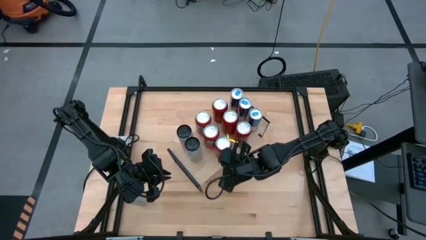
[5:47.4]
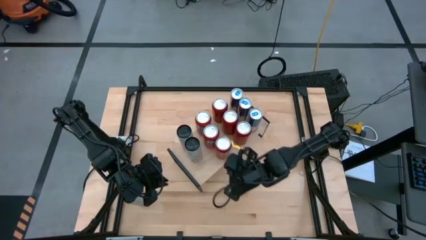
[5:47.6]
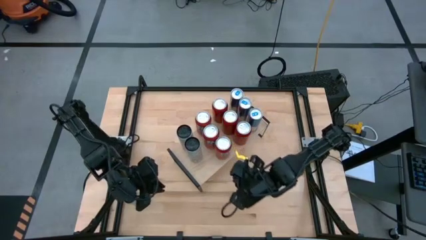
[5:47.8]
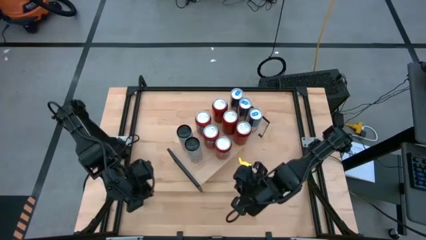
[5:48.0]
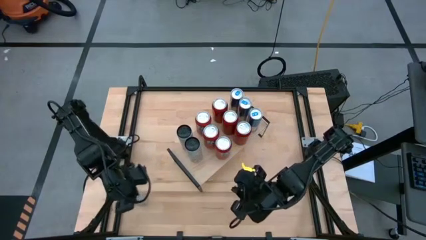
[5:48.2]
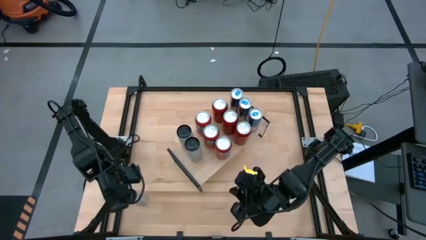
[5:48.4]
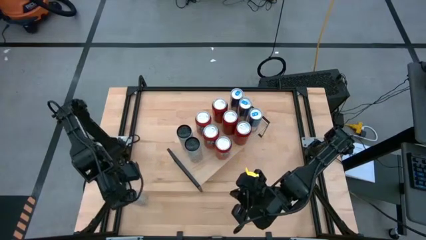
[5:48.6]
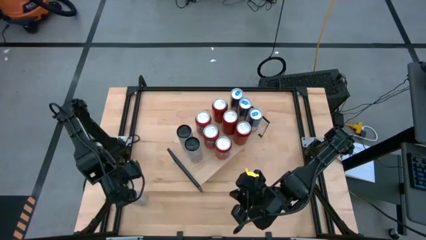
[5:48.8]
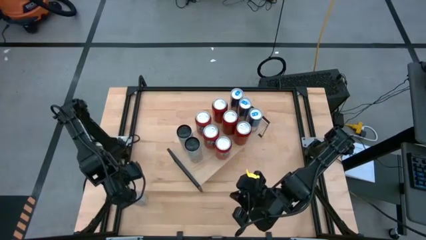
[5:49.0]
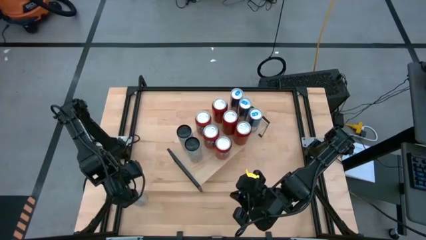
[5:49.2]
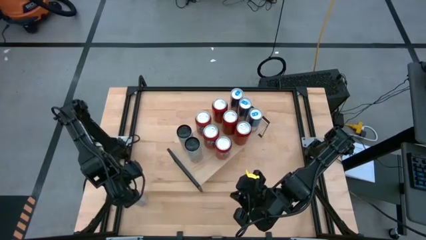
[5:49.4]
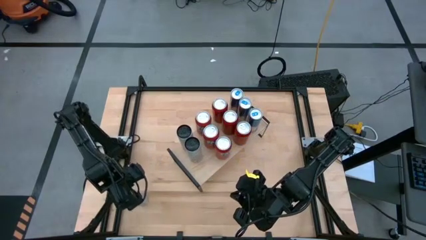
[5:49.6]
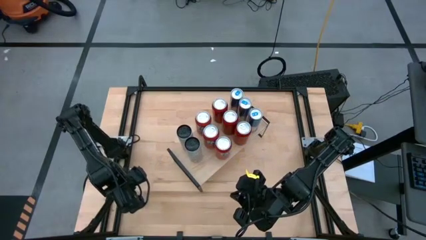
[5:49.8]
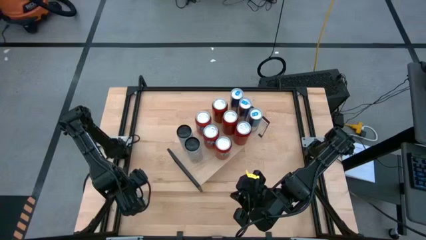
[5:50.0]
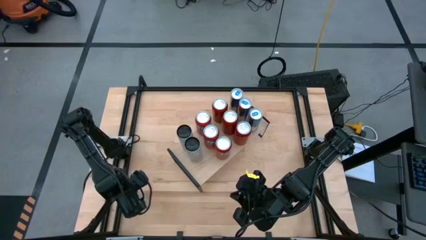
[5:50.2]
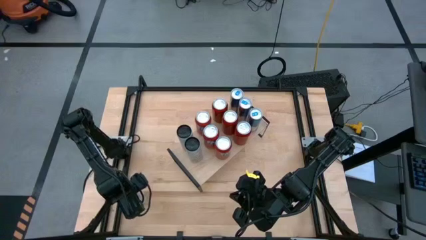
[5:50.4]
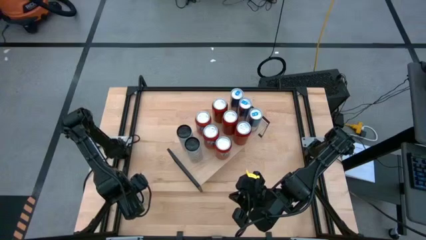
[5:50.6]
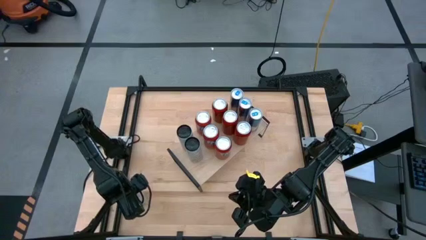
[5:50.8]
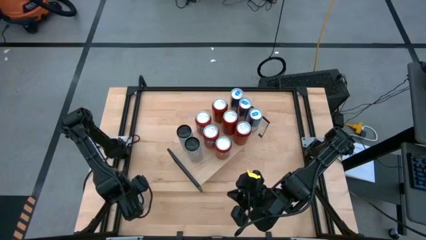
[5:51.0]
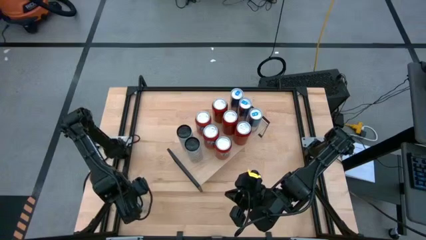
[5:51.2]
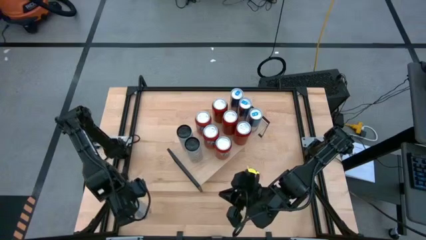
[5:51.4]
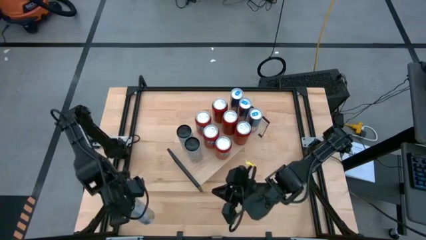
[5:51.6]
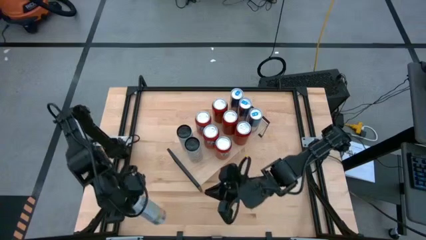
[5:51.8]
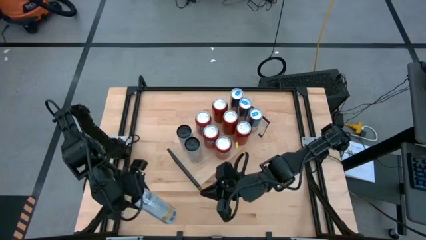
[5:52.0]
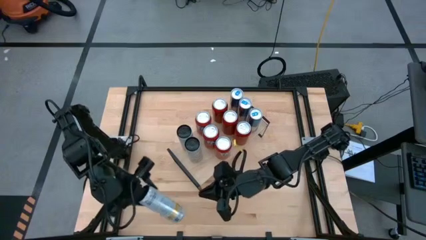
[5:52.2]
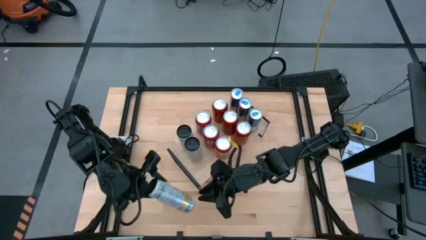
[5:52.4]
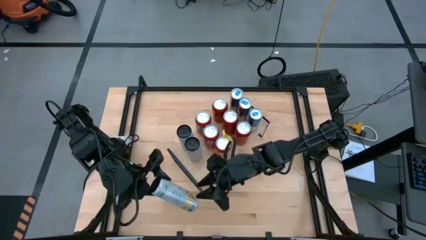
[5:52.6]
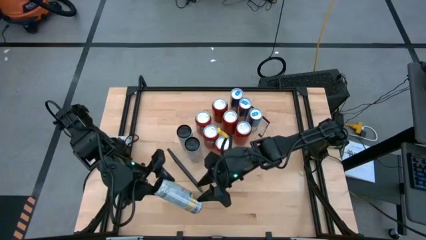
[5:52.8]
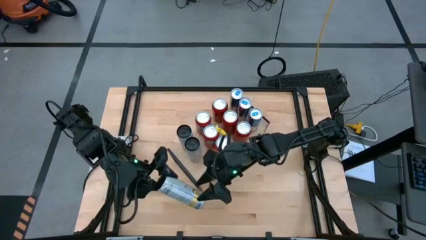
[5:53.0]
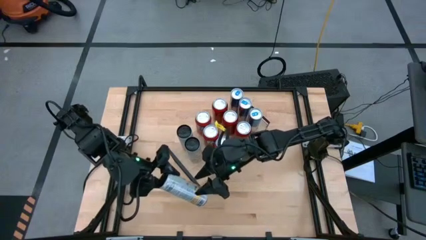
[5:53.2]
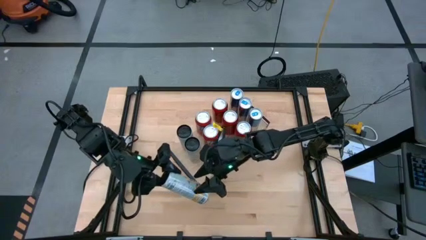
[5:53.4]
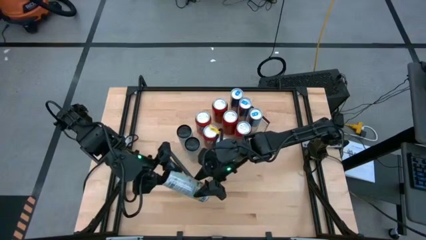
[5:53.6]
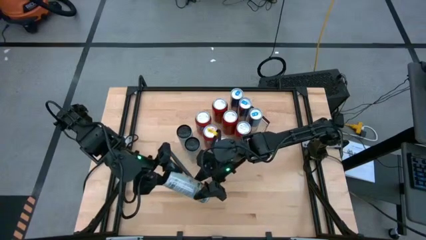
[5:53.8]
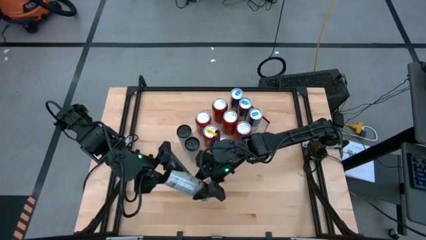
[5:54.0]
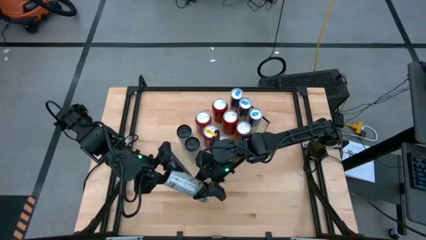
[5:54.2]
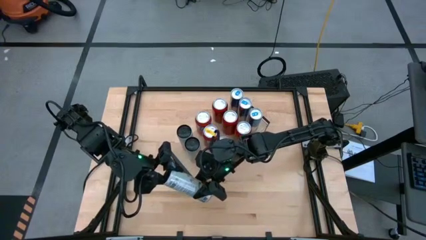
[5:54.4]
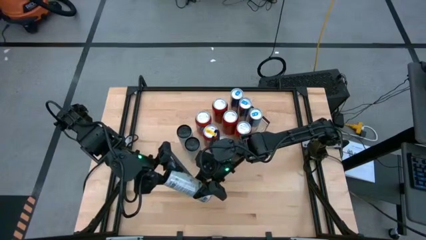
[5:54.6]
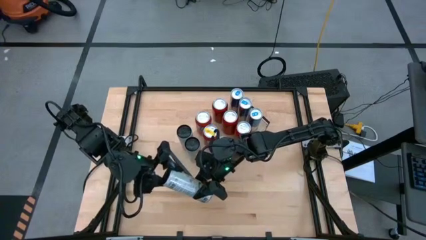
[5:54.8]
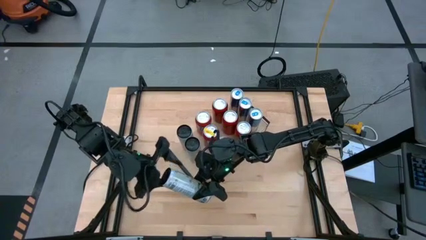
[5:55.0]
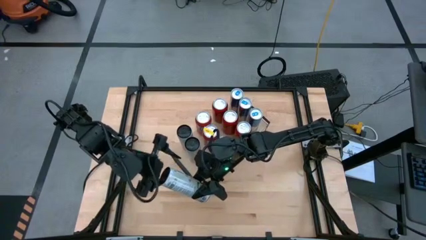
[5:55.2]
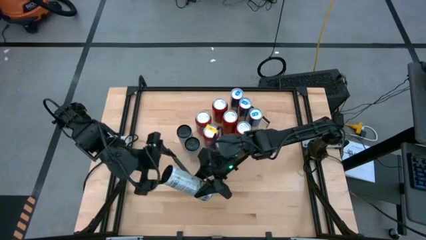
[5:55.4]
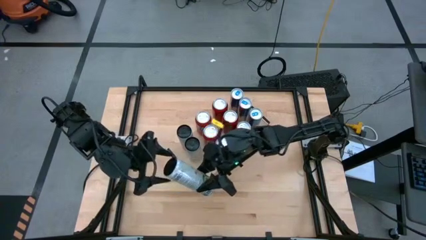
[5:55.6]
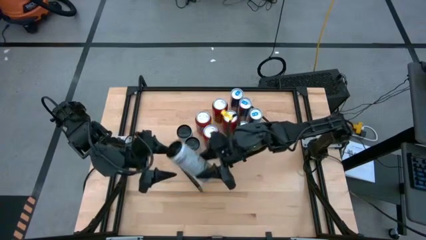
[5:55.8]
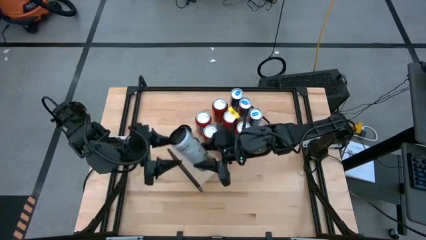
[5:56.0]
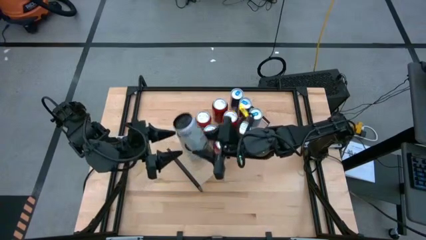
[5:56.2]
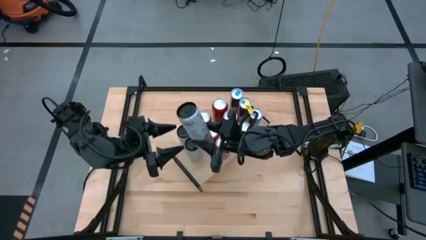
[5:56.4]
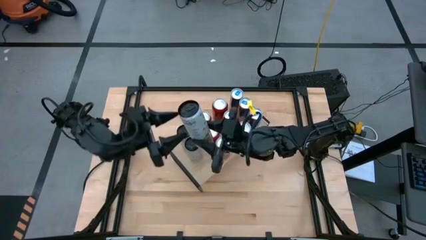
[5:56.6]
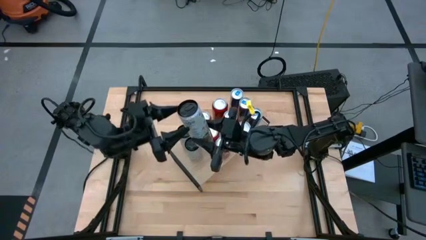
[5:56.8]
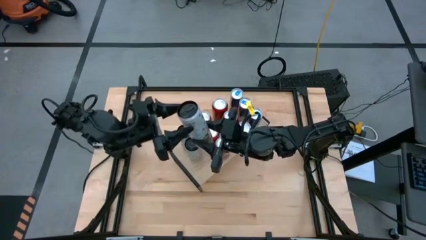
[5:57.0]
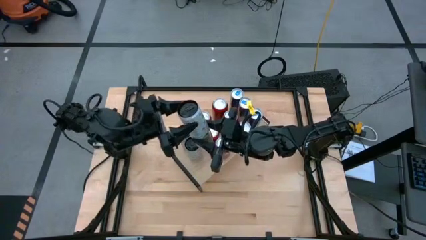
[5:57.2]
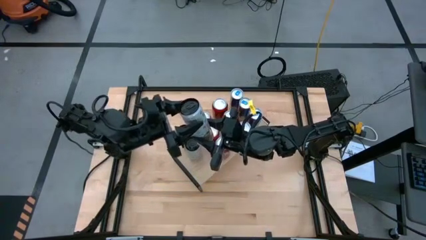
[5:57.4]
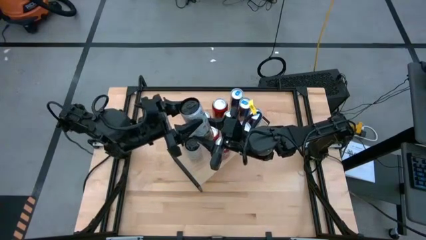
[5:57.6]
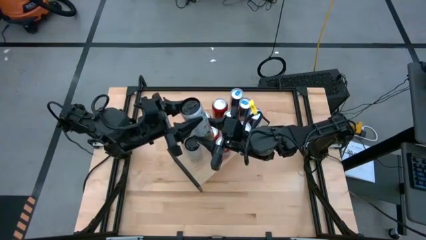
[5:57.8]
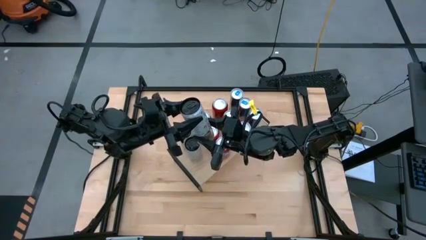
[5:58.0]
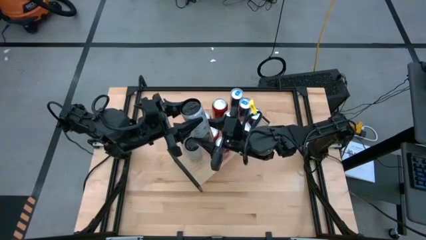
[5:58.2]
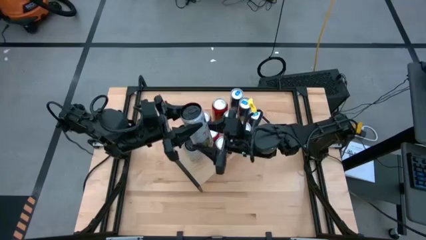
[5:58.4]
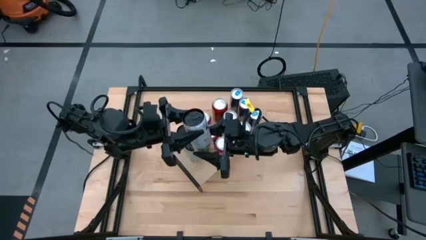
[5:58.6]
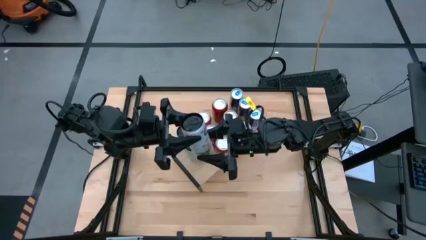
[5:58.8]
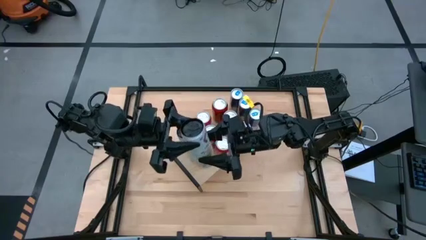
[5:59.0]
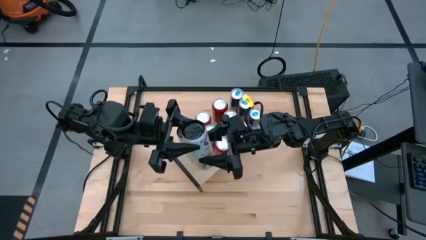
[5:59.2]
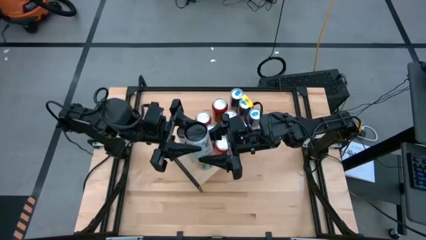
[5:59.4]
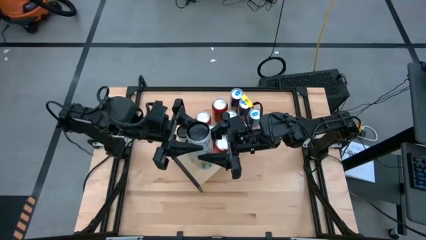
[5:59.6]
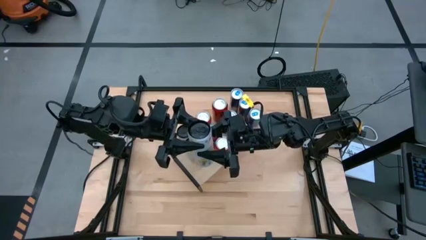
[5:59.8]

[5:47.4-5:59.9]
Task: Place canned beverage on shelf
Put the white soda can on the shelf

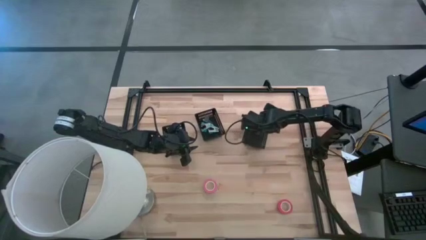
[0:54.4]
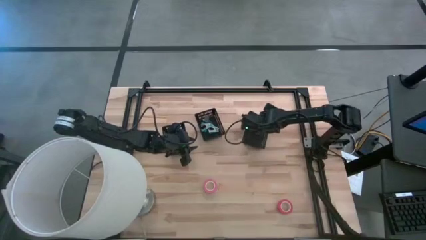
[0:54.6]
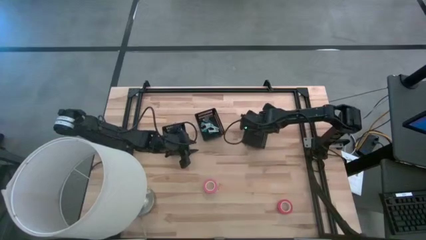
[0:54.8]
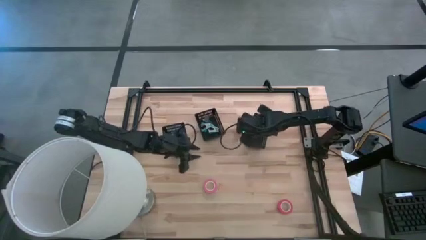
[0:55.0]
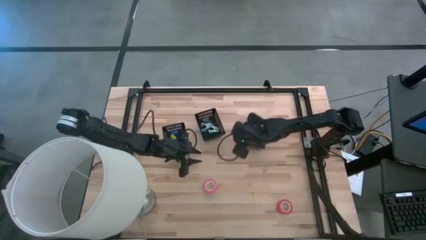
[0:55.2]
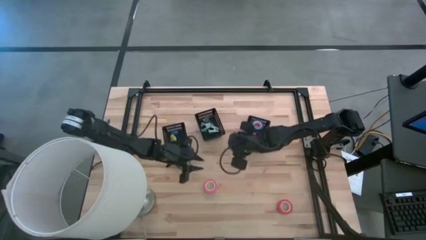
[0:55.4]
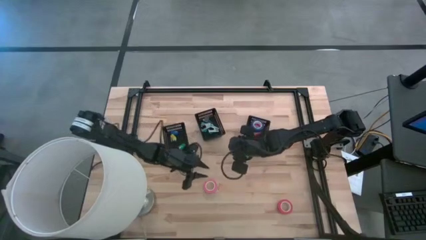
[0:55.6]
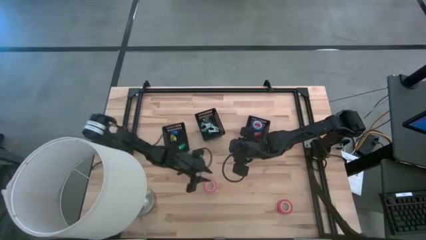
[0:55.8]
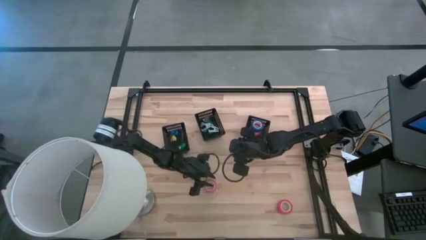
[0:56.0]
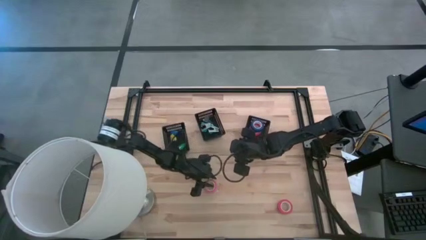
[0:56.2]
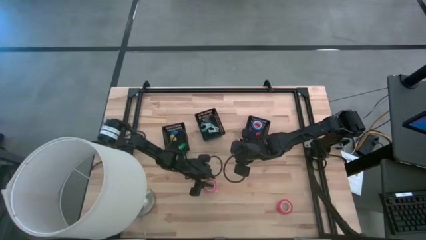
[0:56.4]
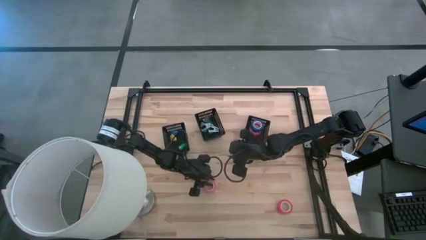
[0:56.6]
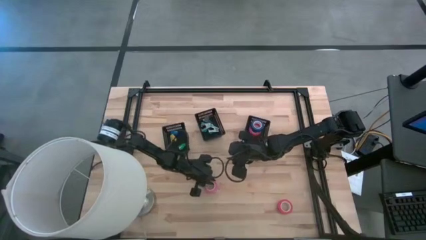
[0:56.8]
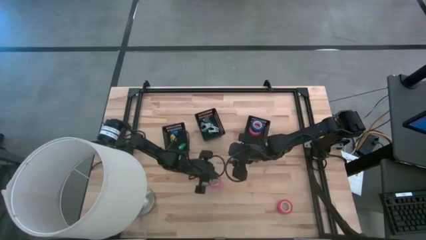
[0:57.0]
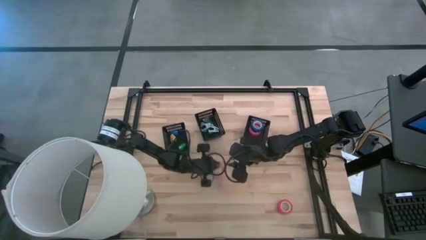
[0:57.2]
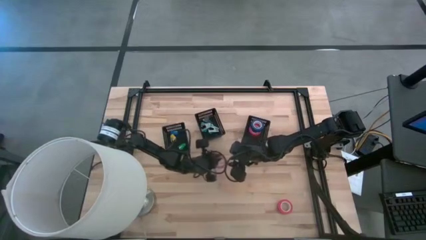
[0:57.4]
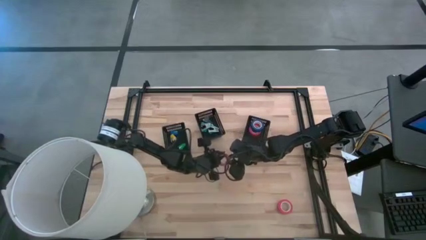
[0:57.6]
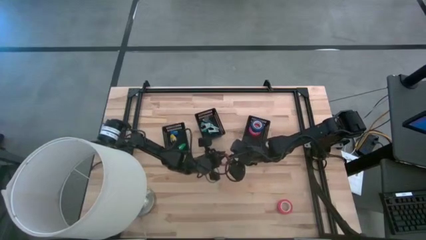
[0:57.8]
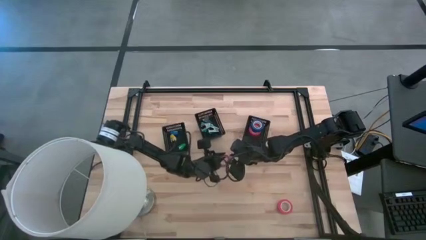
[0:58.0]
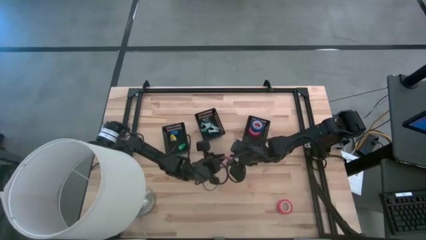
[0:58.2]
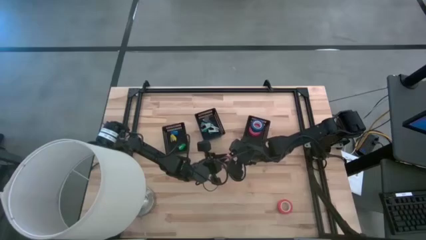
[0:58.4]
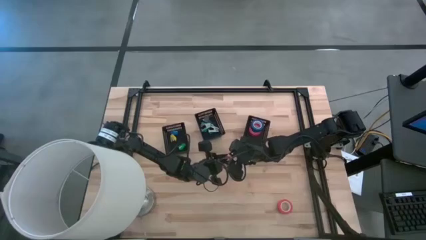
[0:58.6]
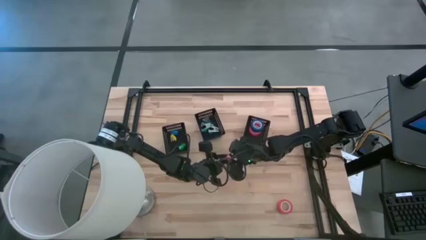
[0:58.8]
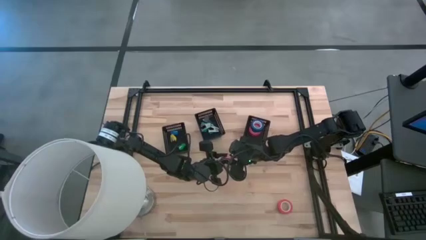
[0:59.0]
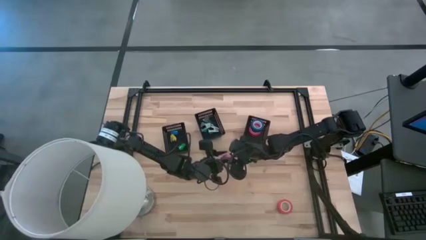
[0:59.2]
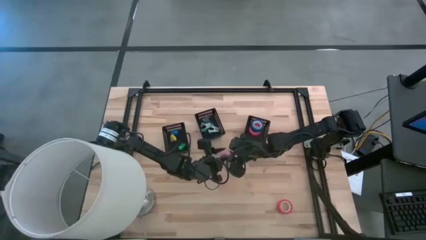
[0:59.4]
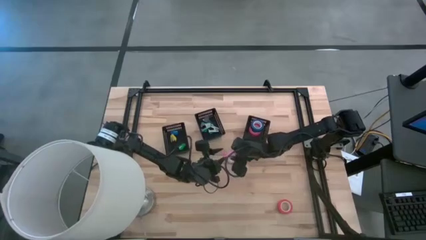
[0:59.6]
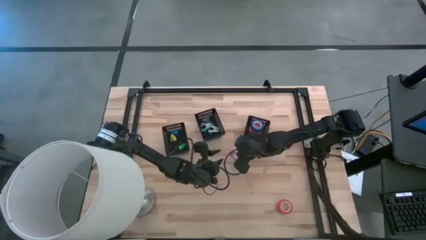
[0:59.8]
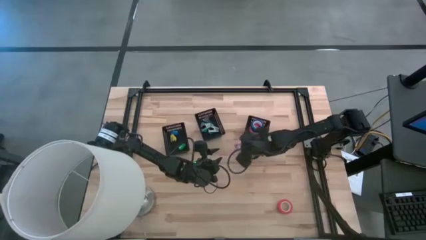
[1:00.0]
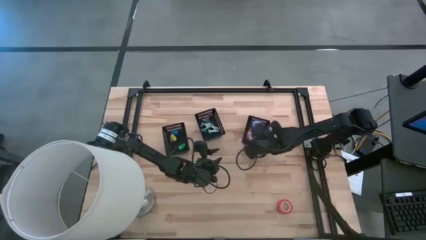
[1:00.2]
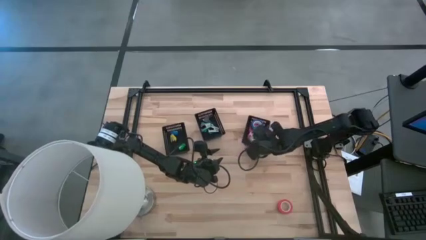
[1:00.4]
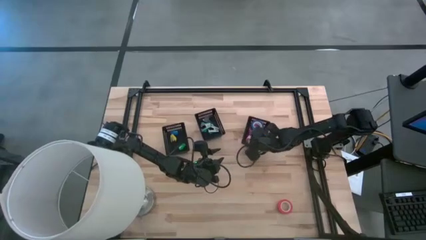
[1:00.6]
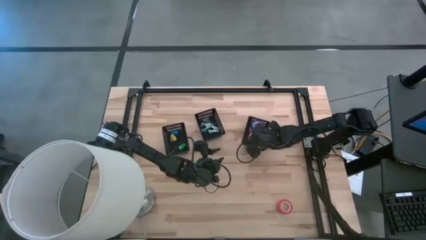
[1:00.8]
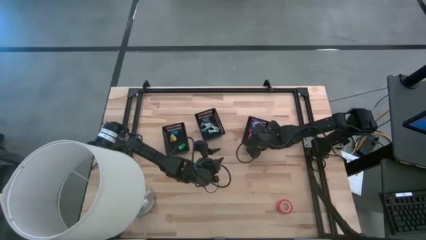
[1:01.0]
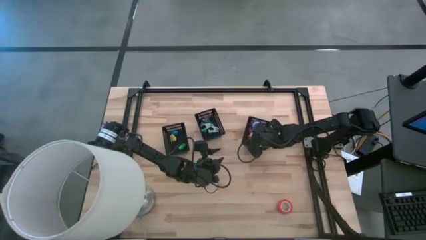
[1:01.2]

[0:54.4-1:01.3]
Task: Pick and place Stapler, Stapler remover, tape
Put the pink tape into the right black bin
